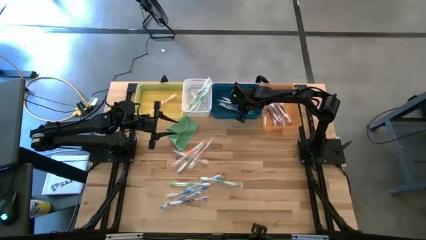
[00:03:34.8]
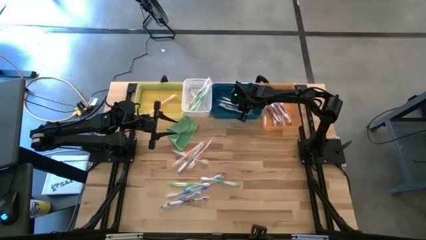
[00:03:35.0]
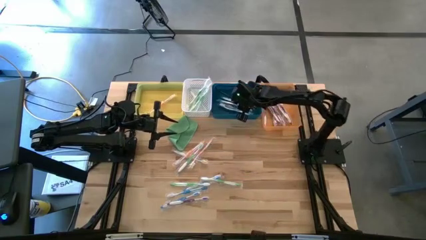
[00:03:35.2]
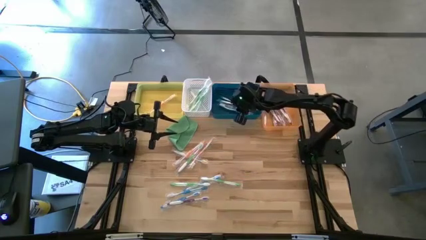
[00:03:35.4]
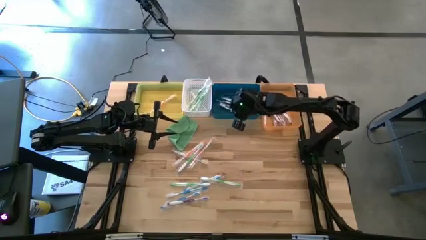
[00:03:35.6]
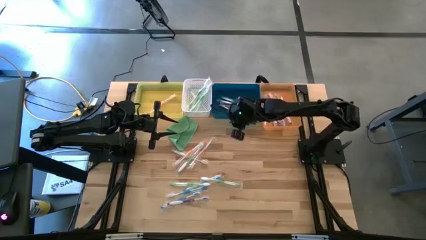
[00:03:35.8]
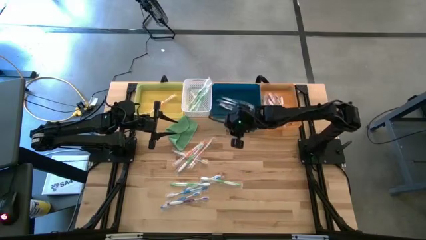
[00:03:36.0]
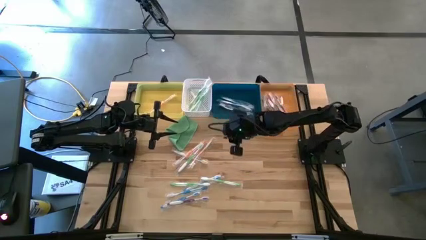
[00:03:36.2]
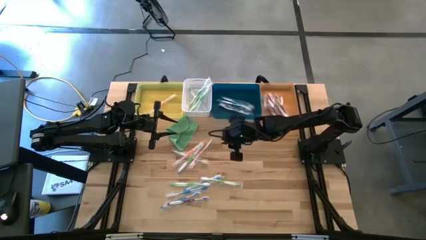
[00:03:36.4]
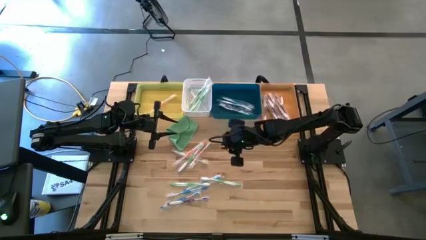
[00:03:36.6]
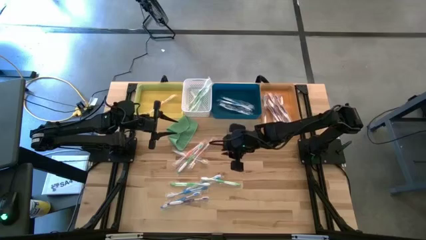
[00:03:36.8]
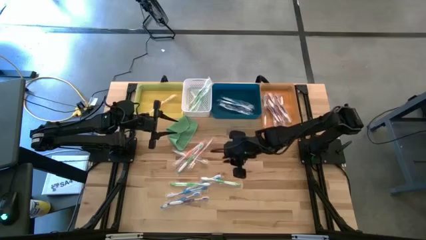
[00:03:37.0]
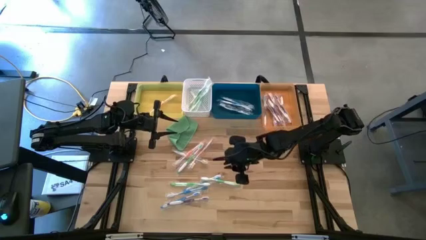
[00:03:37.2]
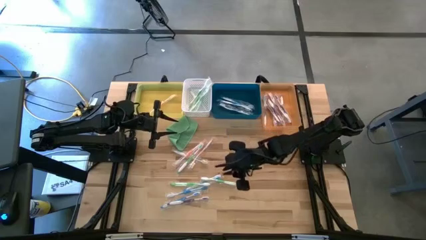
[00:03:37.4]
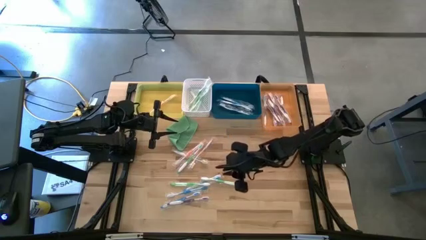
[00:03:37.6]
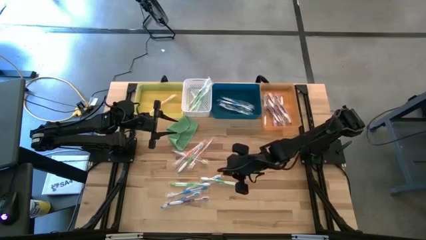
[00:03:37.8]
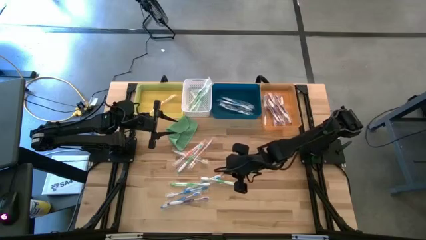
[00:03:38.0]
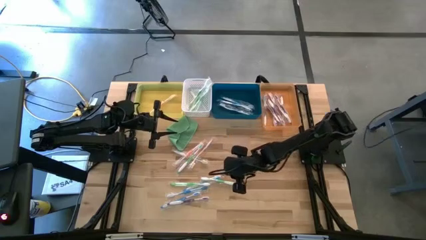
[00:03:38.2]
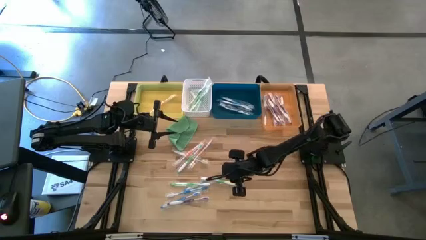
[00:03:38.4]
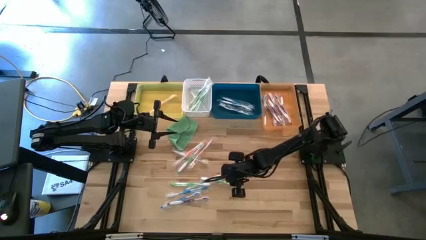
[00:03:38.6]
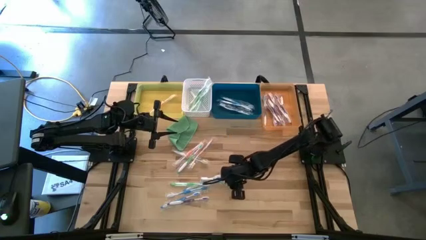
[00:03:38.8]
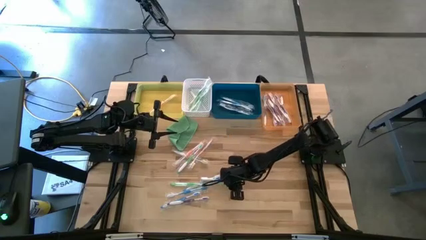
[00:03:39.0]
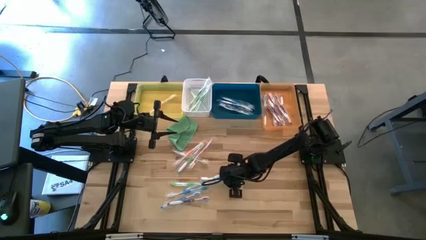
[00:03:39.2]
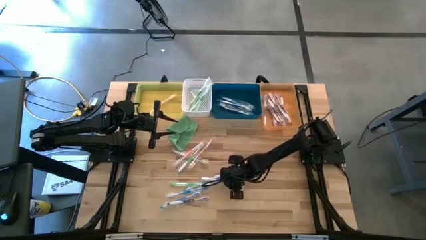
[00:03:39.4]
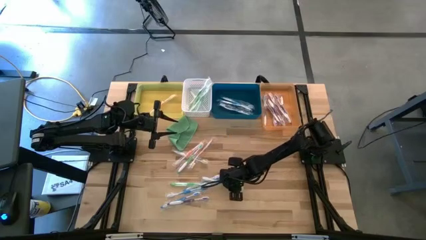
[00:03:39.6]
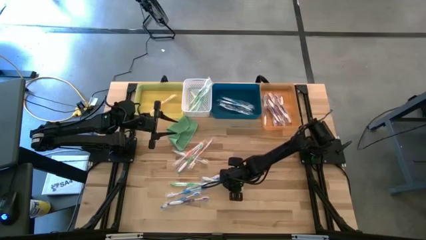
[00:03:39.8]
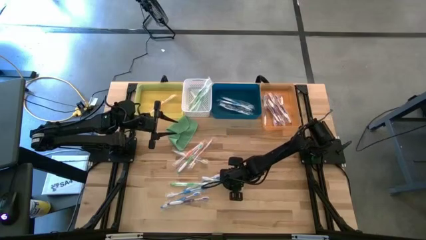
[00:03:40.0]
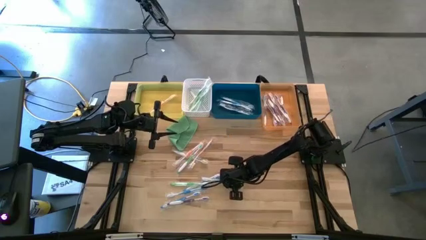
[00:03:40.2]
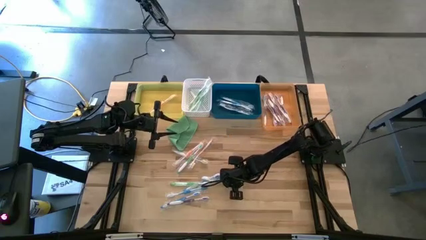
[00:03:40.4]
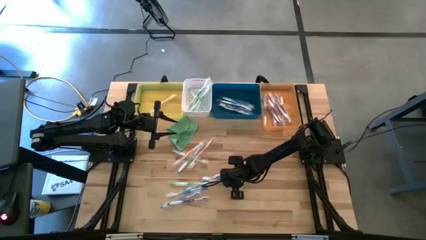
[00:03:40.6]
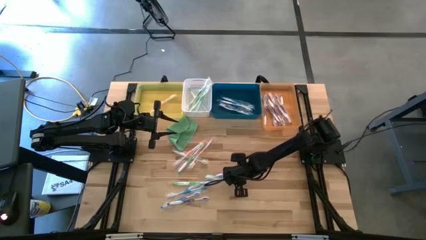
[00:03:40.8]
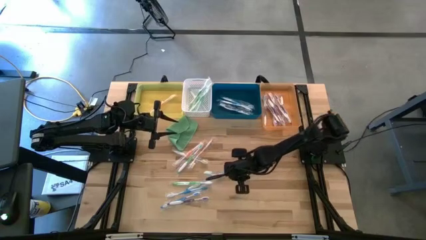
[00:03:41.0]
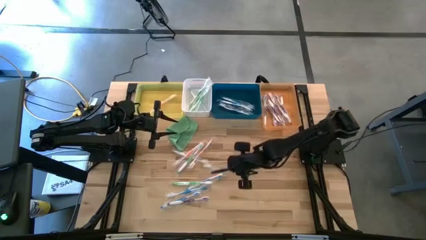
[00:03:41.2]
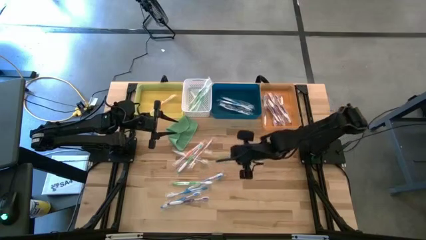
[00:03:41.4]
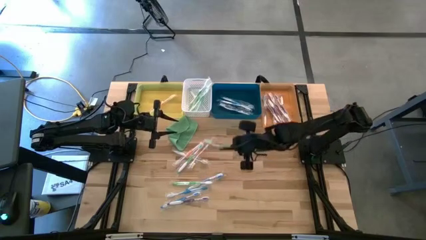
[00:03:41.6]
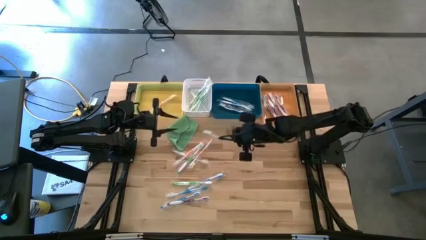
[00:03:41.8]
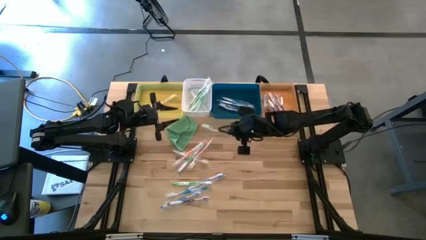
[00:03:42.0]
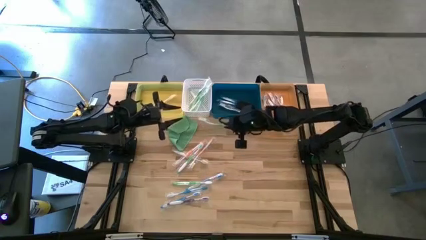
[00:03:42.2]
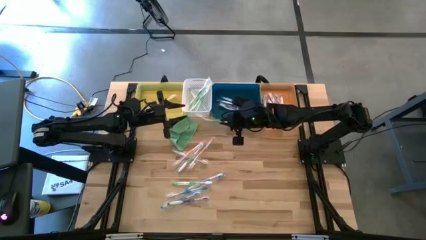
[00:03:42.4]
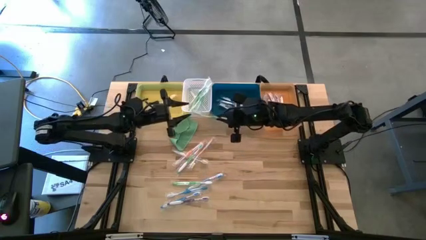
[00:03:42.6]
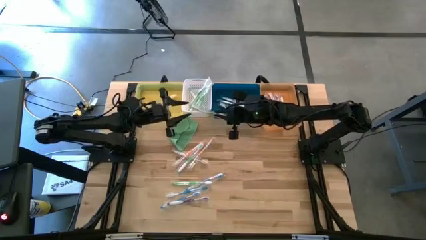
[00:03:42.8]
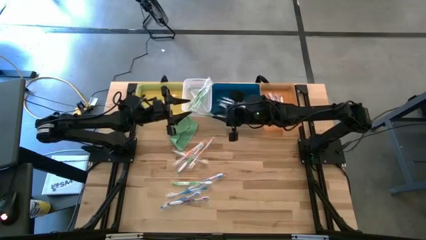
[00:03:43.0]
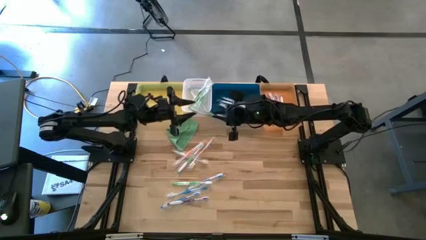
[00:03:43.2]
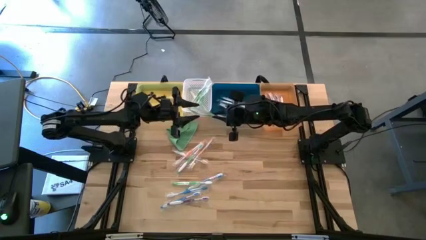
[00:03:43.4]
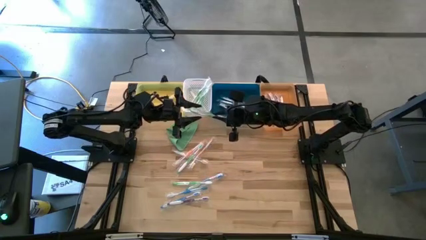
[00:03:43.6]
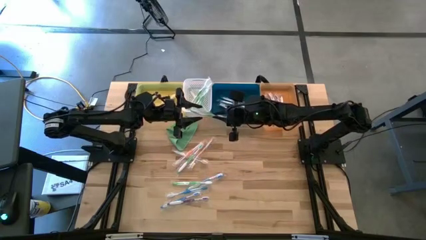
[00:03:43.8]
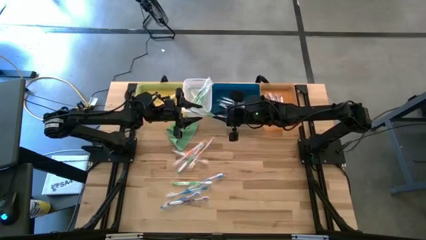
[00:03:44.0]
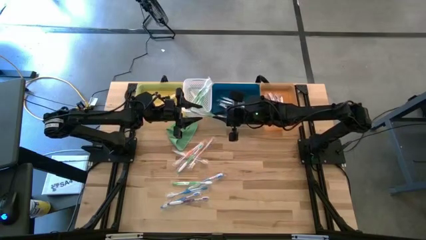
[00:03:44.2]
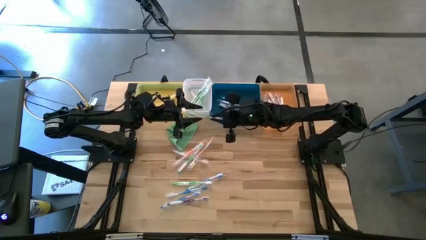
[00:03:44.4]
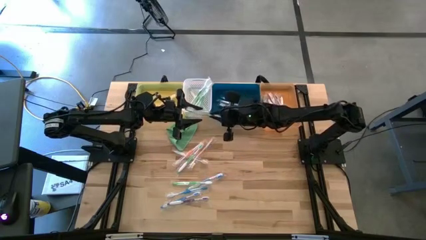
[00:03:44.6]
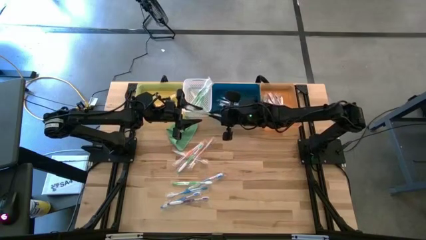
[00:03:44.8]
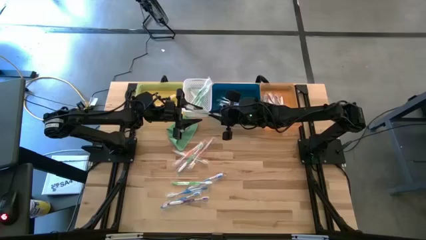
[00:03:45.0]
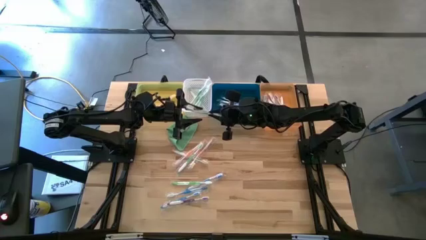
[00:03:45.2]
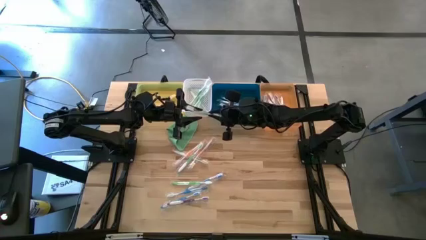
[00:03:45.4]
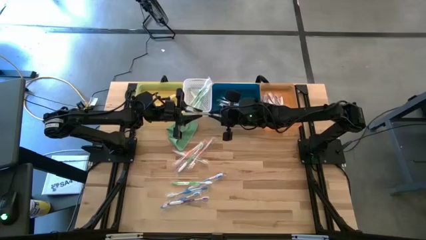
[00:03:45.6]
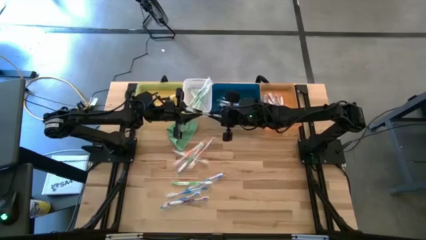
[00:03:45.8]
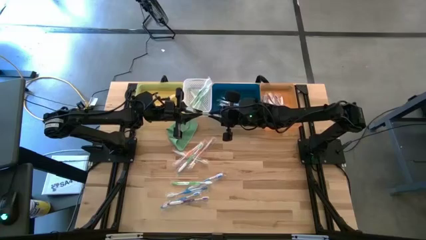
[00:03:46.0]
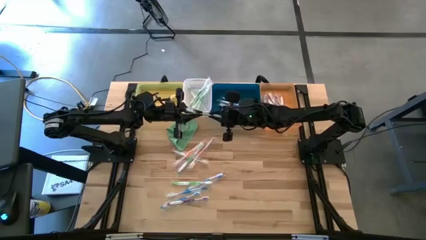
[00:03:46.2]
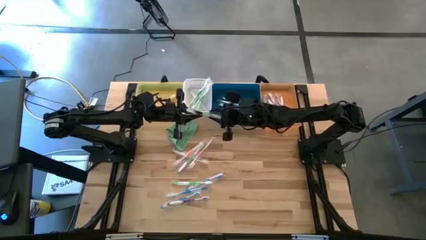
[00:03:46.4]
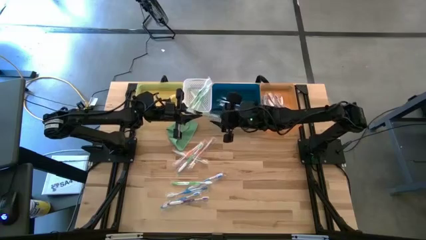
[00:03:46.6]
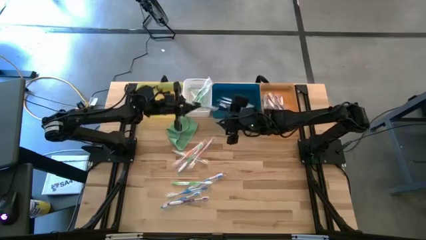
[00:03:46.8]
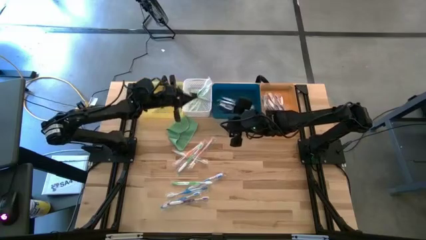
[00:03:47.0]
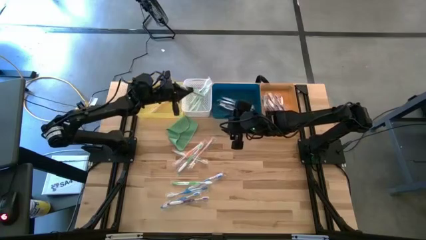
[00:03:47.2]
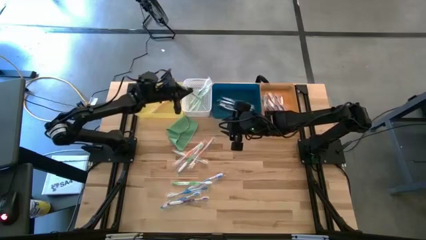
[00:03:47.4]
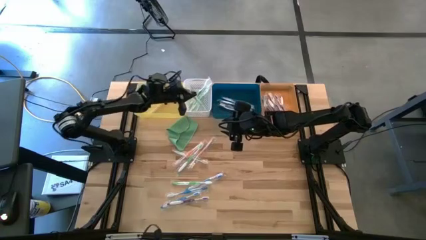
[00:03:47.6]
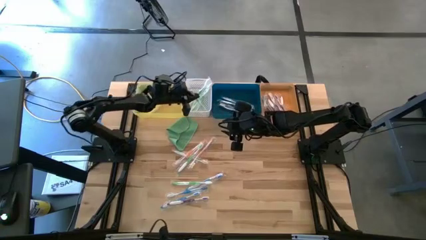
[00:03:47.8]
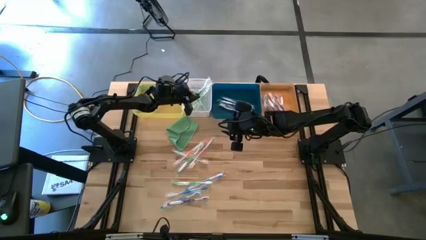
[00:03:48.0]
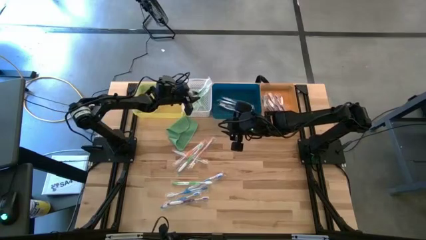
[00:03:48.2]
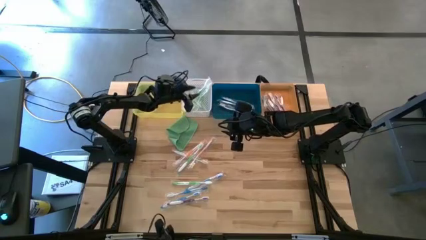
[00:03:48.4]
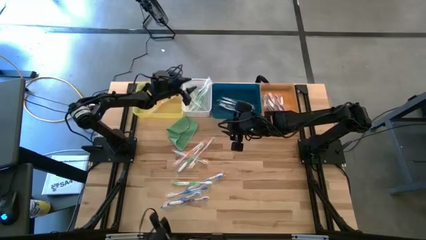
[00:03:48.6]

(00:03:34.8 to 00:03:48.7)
Task: Pick & Place Toothbrushes
Put the green toothbrush into the white bin

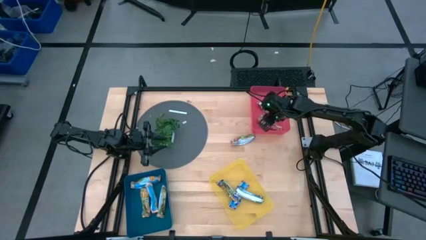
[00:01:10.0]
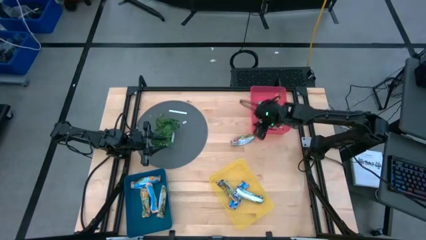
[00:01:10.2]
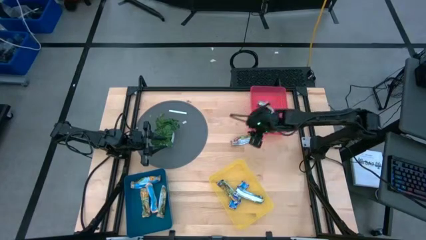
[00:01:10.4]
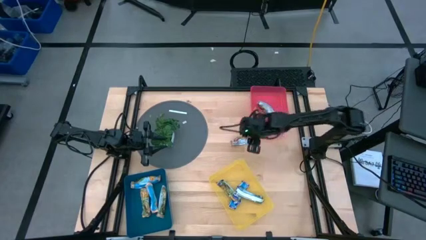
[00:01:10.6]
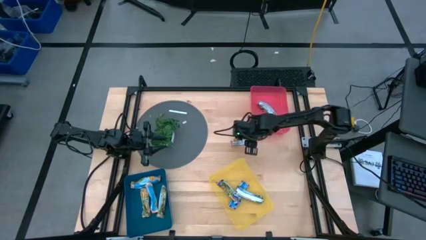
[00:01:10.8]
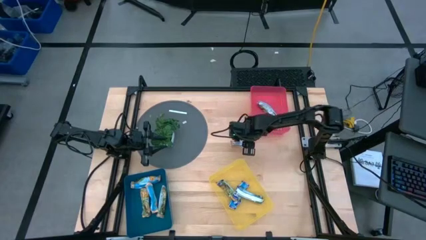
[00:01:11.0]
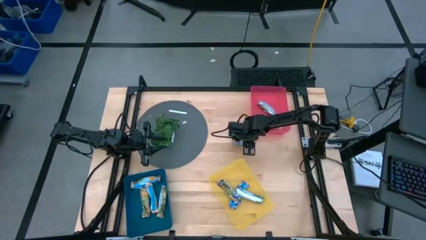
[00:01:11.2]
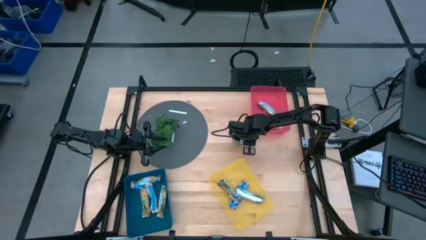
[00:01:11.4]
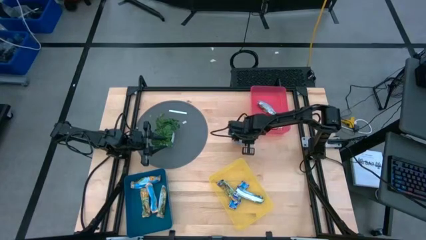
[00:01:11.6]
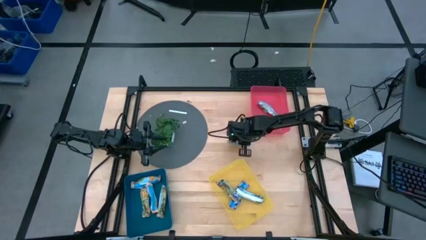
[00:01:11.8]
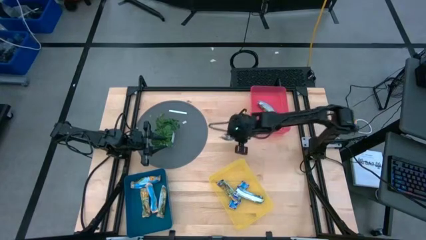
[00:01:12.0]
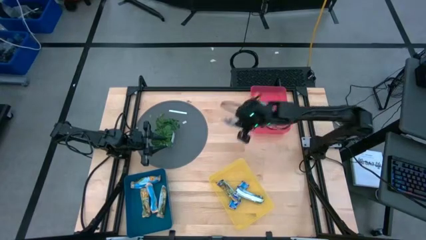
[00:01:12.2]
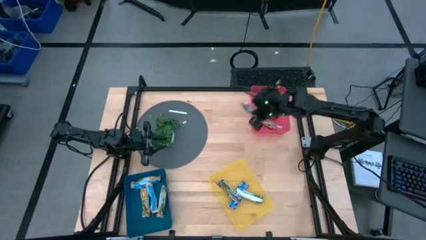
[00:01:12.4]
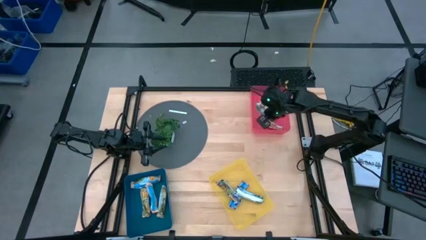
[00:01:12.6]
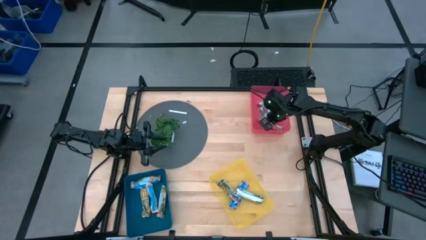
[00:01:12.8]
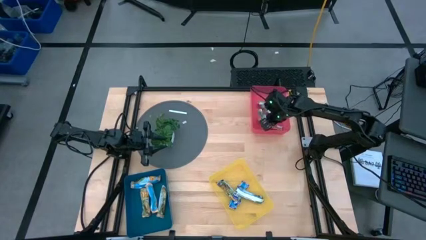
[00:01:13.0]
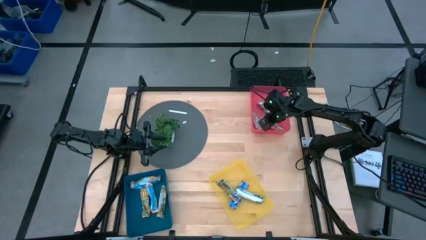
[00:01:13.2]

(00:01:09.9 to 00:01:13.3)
Task: Pick and place Granola Bars by type
Put the red snack into the pink bin
